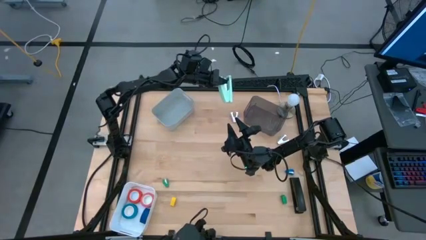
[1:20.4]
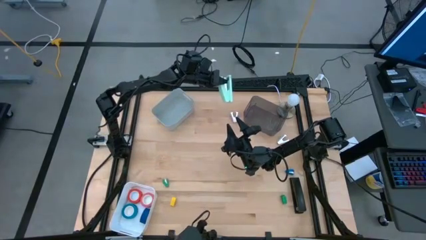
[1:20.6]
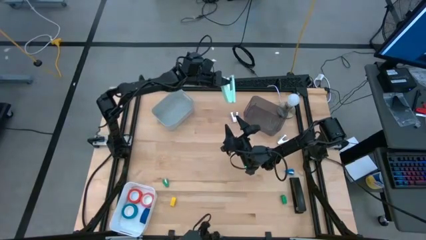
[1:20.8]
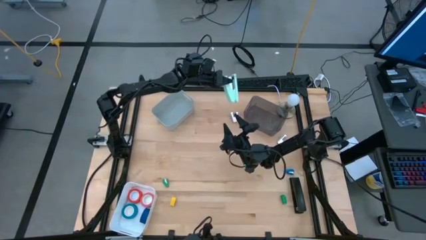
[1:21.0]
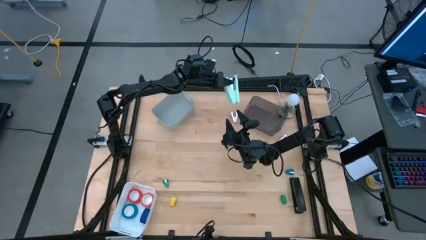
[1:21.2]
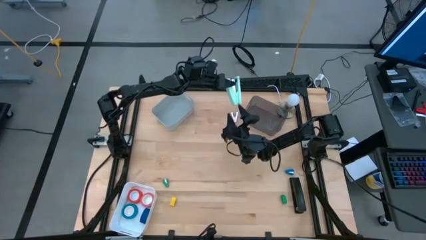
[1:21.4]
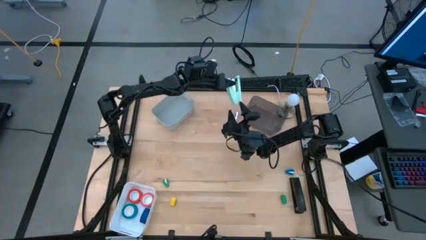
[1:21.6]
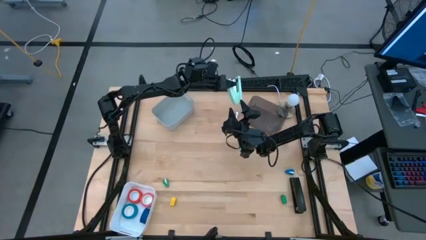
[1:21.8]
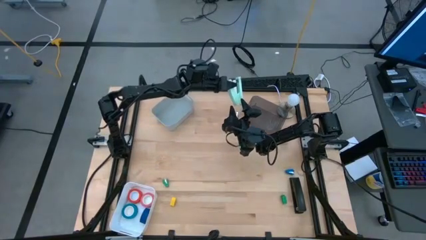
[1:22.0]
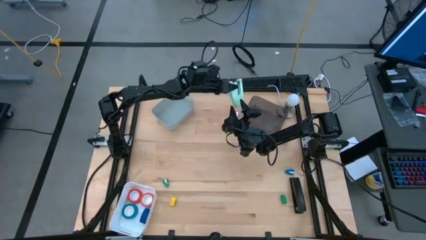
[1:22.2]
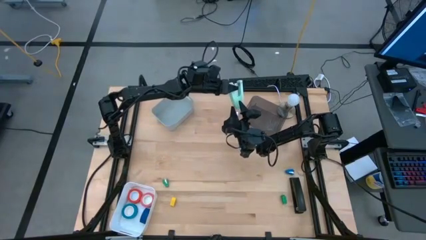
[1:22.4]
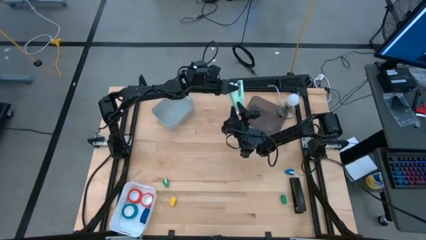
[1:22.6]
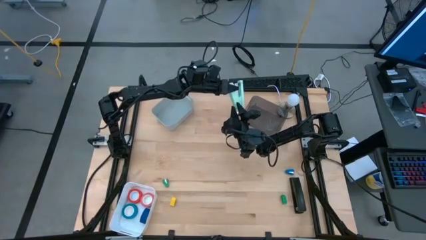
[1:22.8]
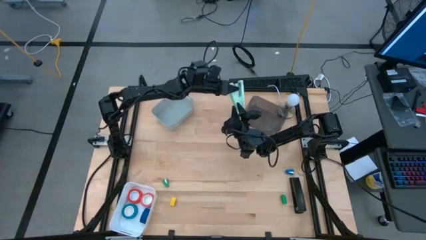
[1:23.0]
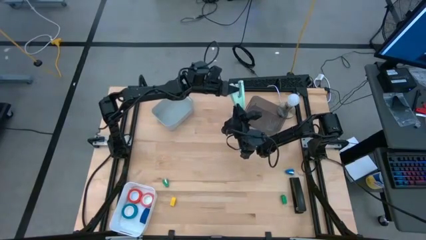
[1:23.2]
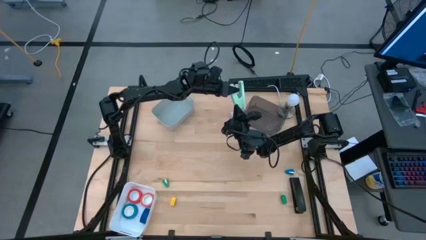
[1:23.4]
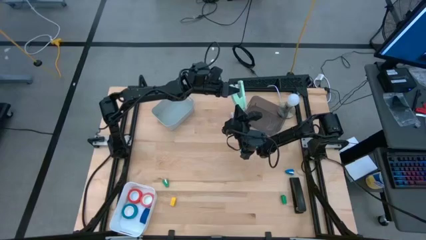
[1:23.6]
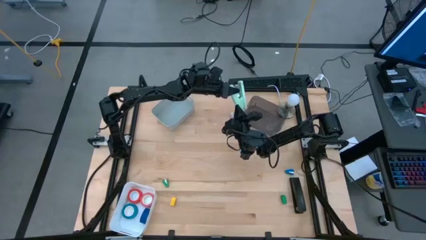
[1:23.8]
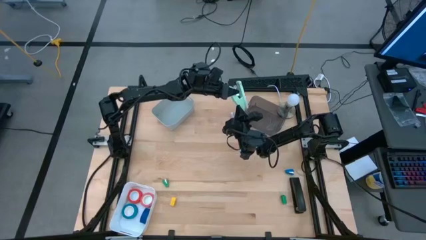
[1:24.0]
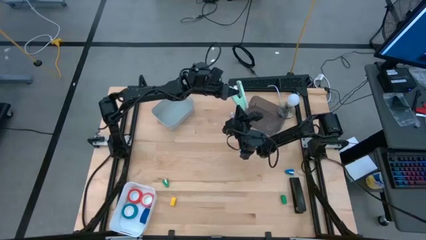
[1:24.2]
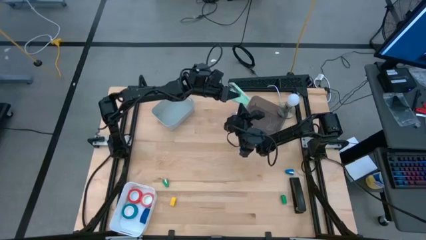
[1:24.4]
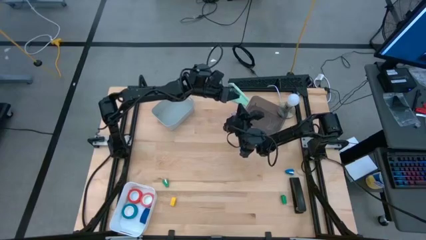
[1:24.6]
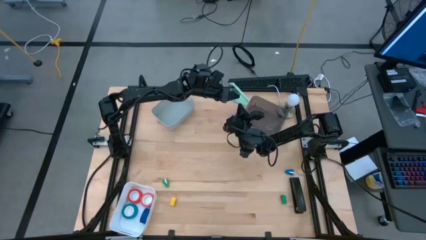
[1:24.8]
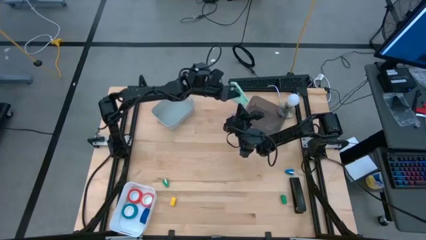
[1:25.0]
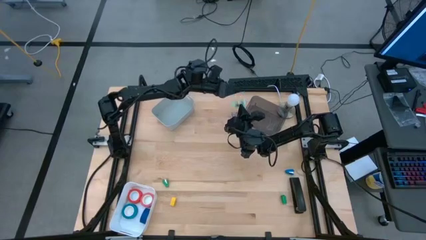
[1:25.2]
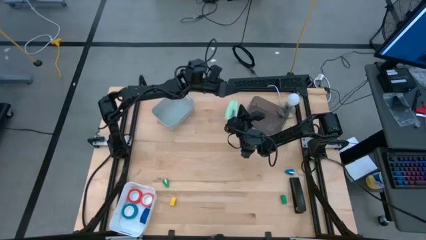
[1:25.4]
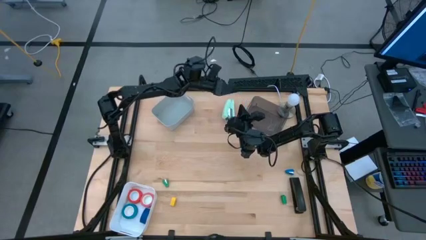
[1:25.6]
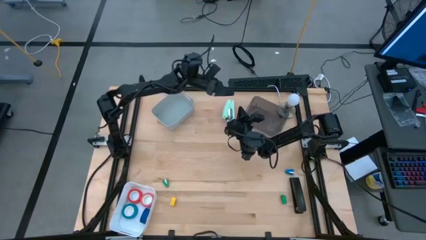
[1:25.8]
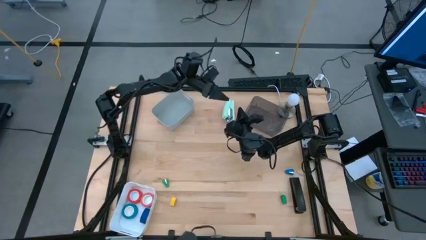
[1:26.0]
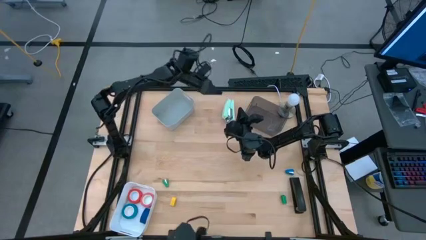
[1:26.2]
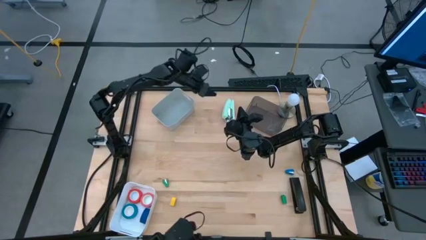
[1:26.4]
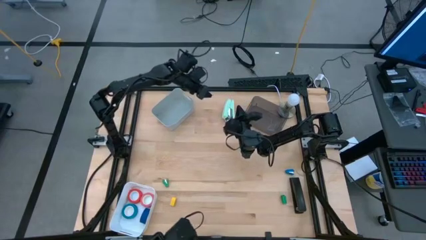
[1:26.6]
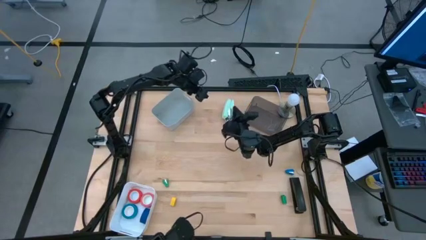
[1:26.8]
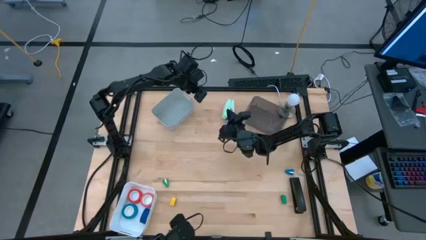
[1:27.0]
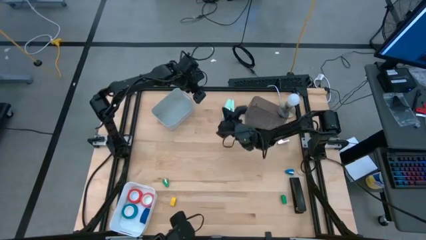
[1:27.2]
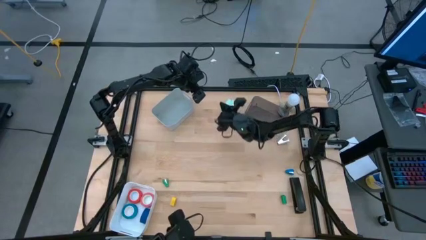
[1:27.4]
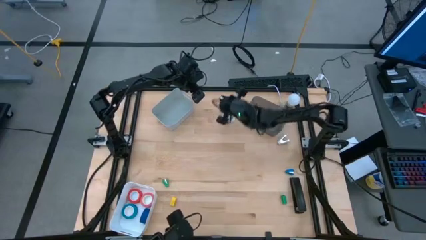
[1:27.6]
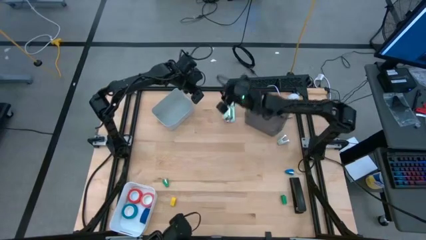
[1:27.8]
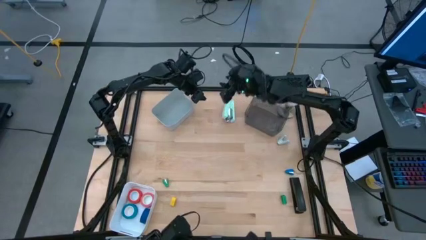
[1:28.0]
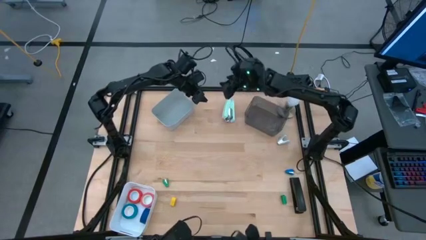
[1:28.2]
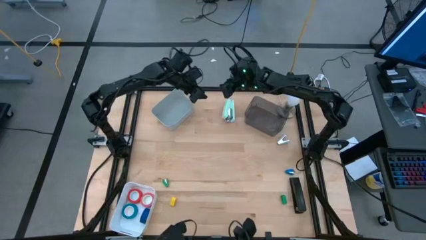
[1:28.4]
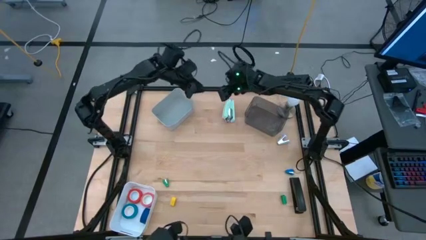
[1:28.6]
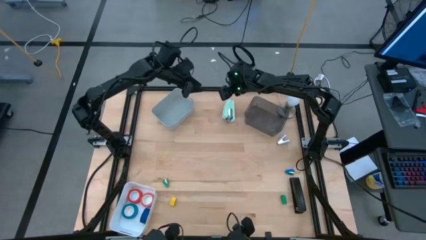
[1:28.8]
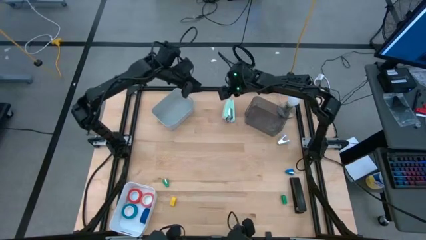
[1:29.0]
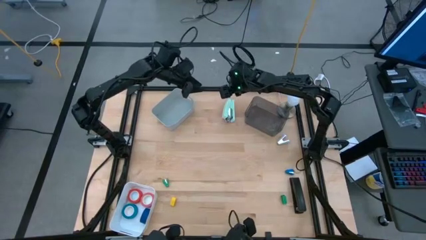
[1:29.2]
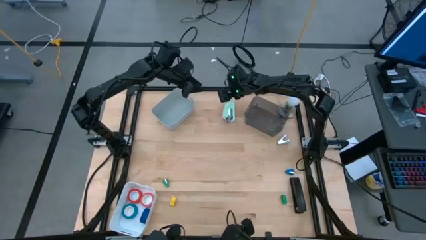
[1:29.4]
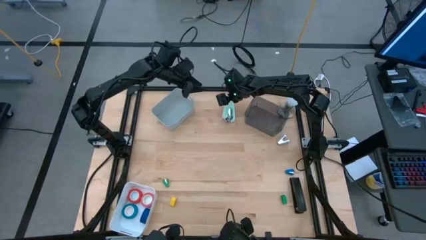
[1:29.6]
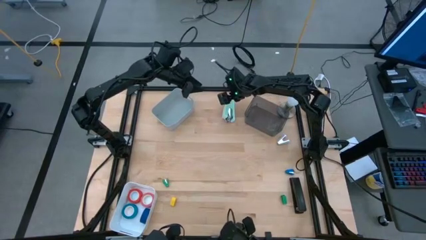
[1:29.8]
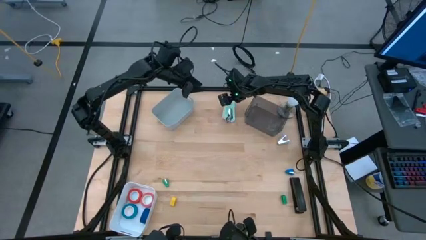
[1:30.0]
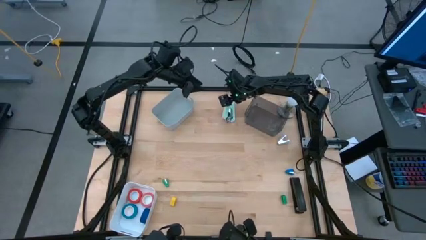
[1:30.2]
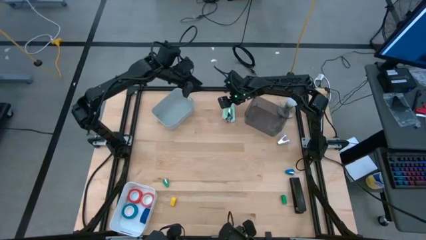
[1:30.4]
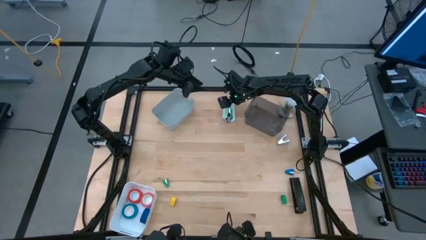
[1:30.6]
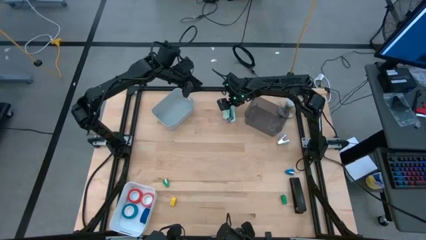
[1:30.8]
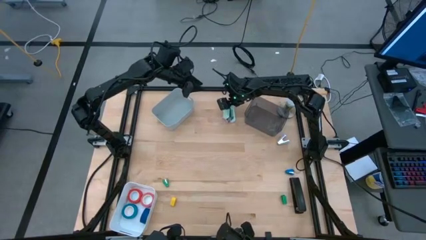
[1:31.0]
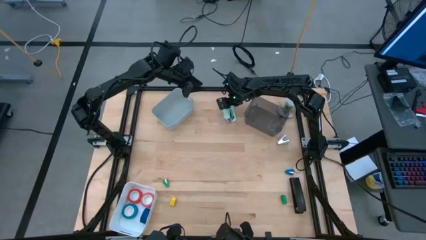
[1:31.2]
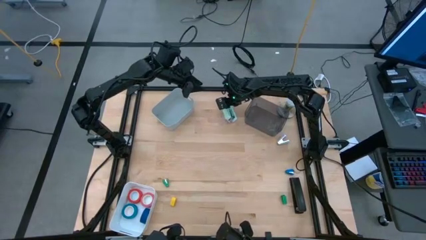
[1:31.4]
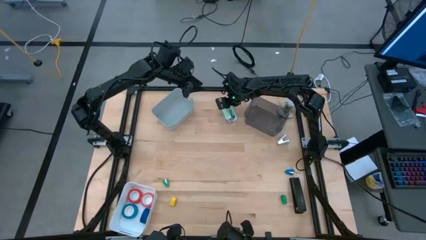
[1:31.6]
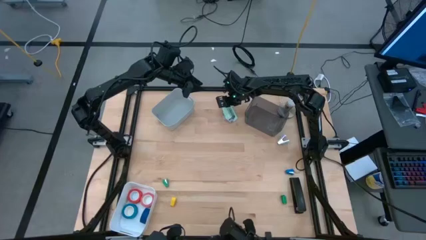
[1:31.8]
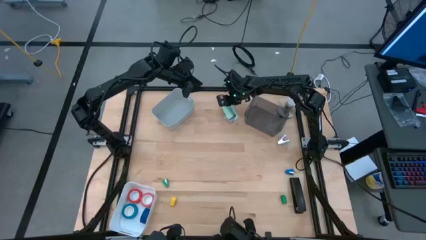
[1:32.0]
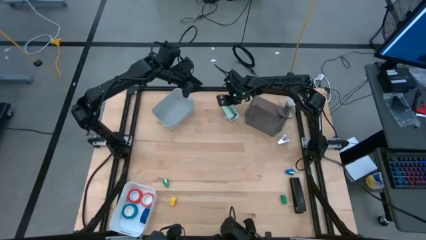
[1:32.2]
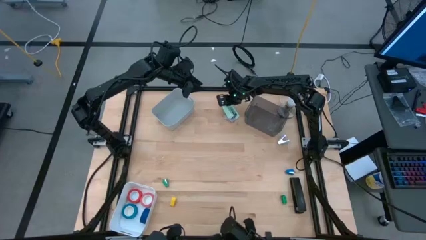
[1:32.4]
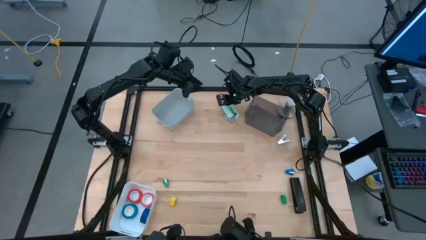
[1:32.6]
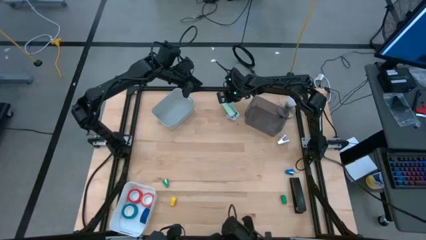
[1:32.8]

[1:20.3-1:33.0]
Task: Pick and place Stapler, Stapler remover, tape
Put the big light green stapler into the black bin

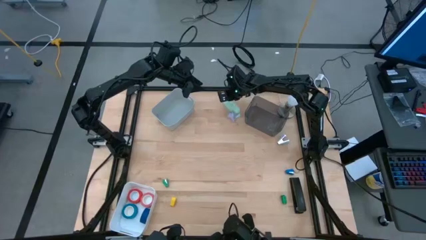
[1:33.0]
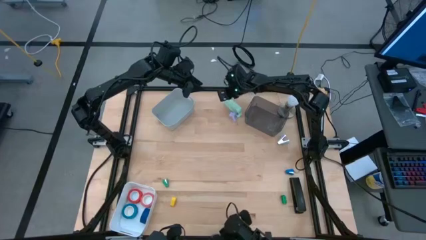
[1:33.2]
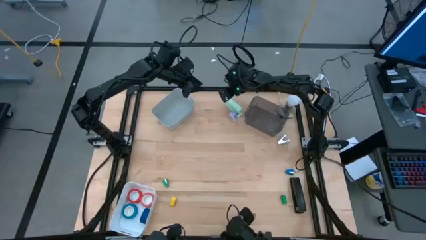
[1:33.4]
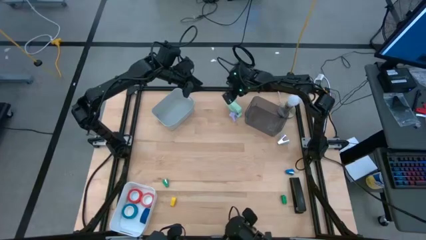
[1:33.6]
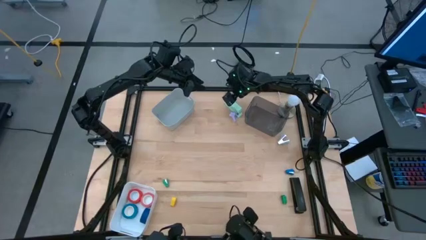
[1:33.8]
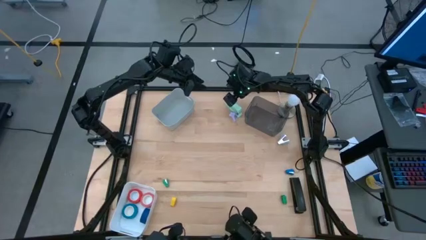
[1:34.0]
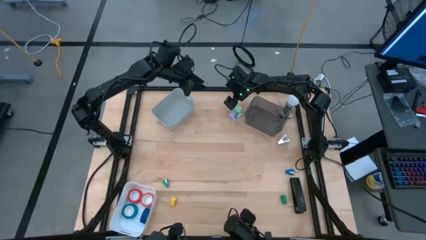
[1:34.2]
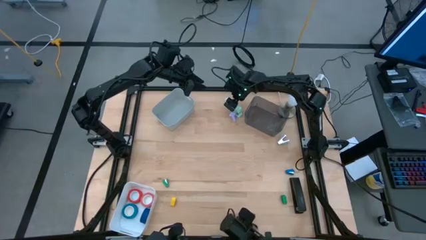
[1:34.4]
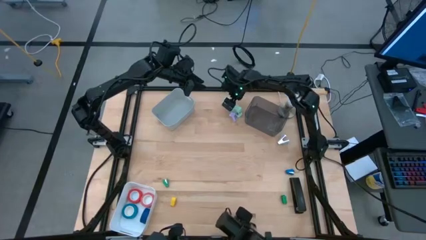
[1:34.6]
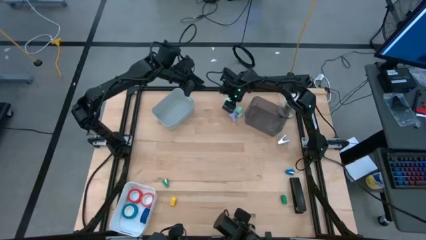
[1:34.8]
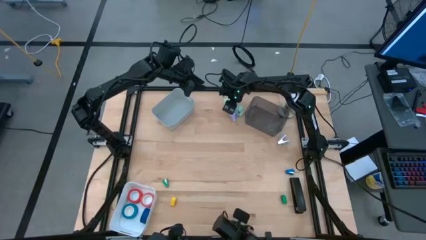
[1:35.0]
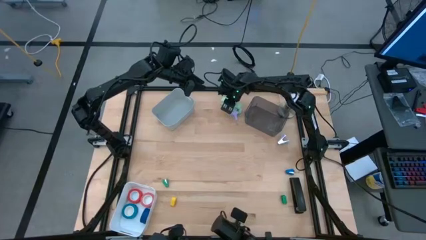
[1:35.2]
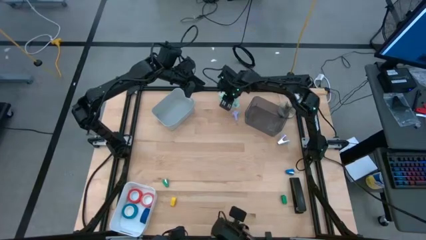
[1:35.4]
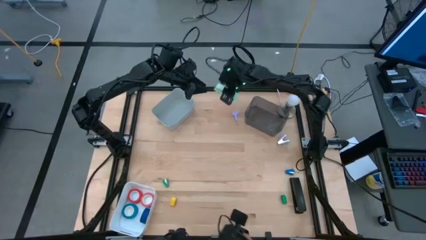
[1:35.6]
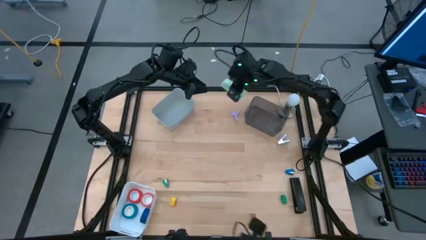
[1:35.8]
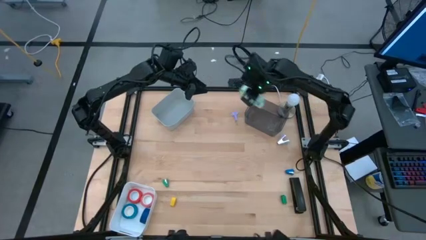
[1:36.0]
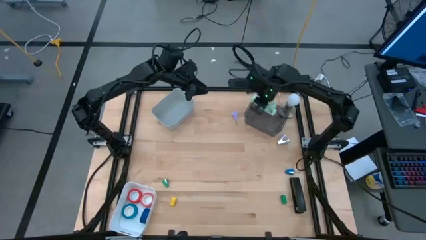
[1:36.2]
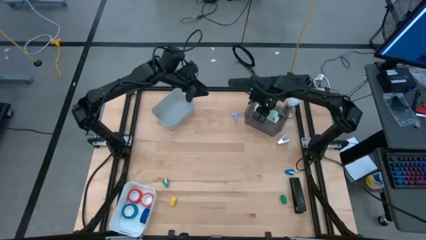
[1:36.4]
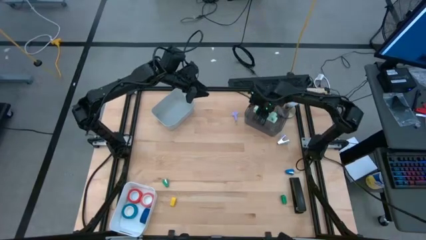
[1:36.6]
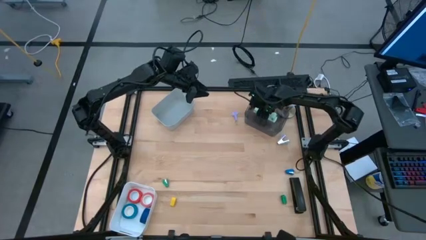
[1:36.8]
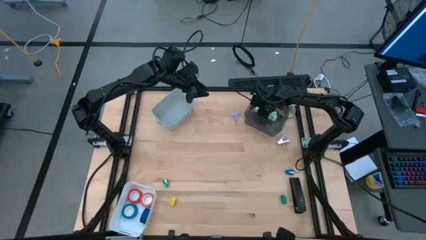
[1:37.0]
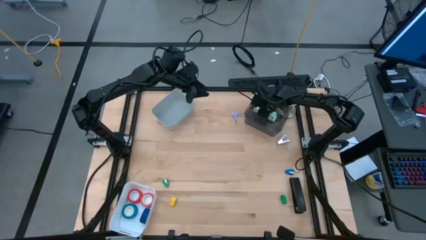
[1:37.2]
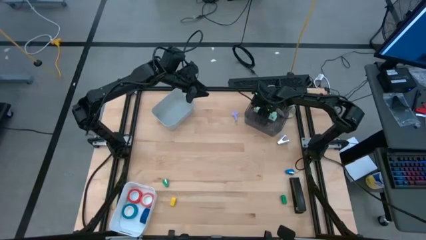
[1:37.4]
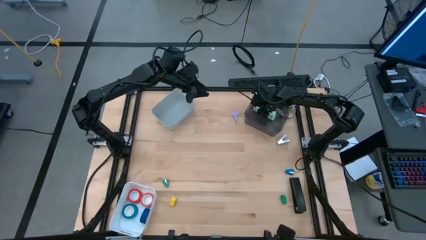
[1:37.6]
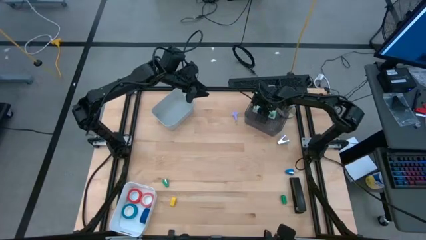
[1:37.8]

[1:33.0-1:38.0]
Put the large light green stapler into the black bin
